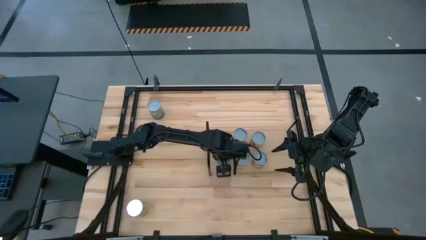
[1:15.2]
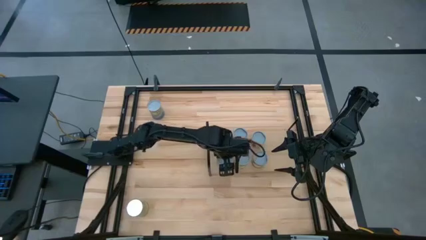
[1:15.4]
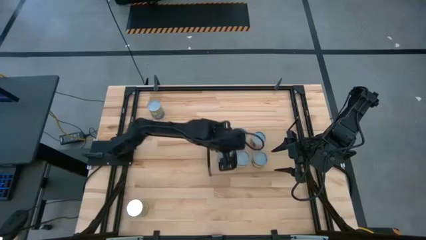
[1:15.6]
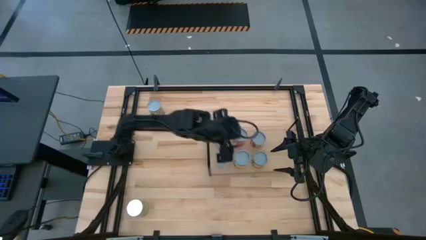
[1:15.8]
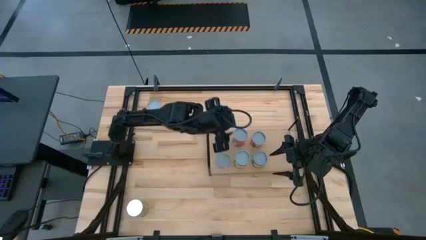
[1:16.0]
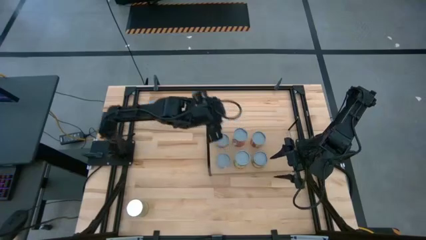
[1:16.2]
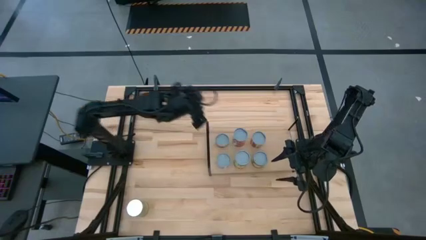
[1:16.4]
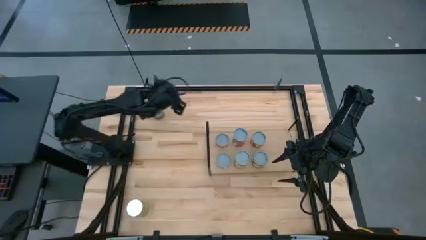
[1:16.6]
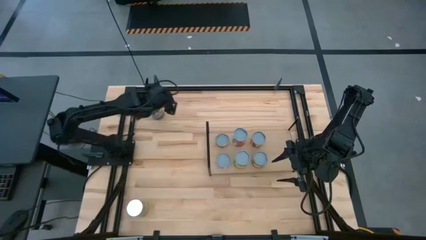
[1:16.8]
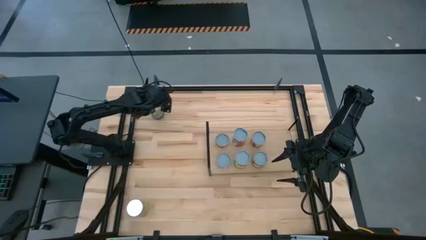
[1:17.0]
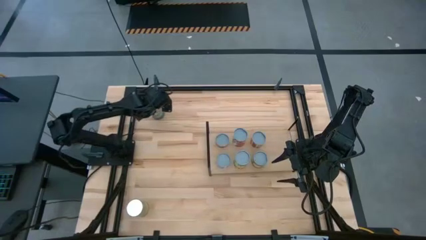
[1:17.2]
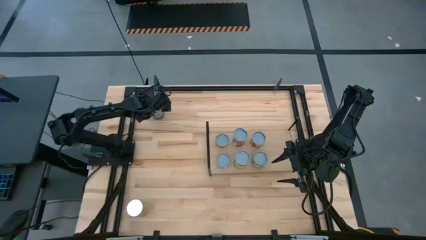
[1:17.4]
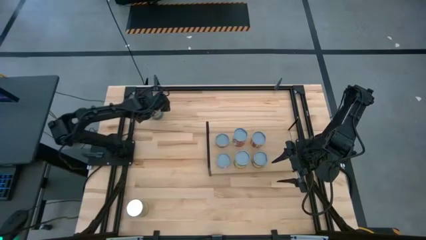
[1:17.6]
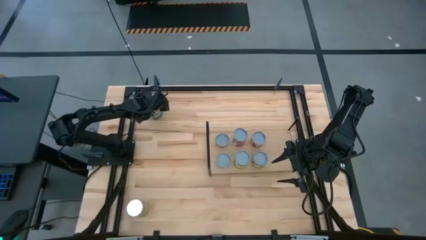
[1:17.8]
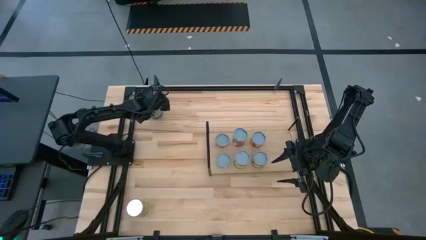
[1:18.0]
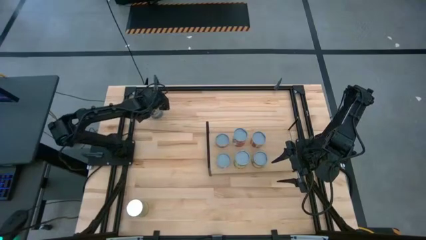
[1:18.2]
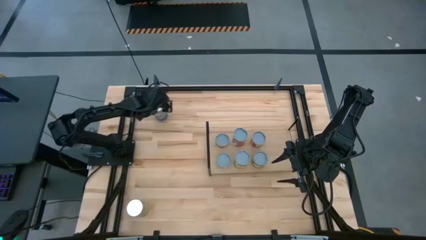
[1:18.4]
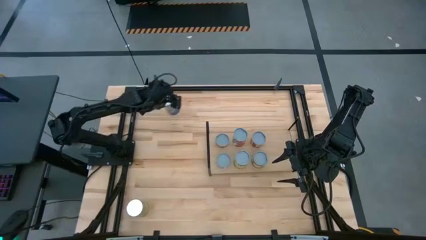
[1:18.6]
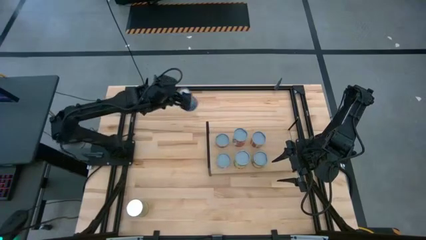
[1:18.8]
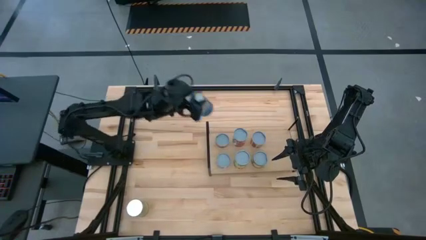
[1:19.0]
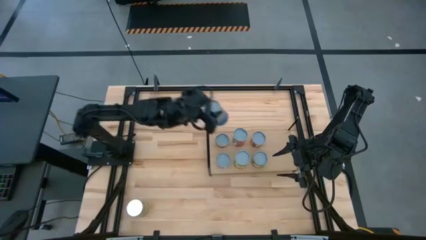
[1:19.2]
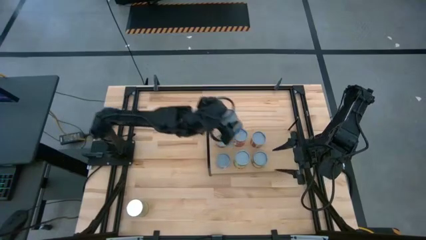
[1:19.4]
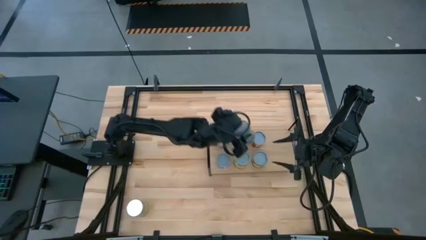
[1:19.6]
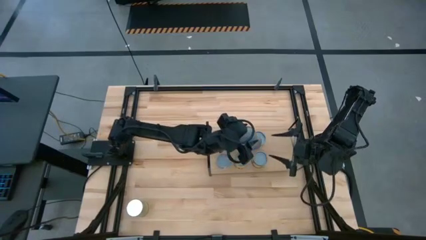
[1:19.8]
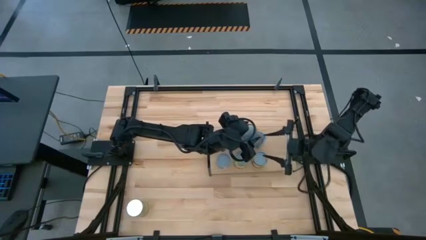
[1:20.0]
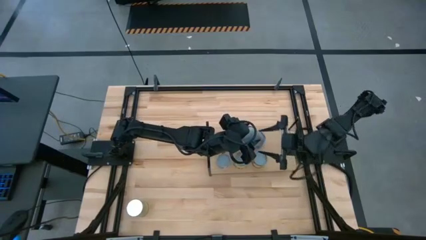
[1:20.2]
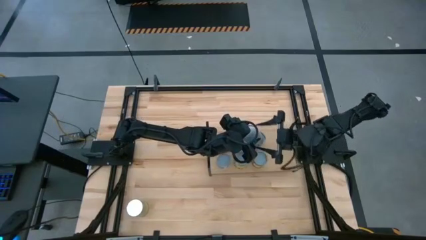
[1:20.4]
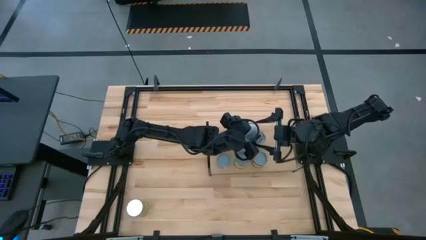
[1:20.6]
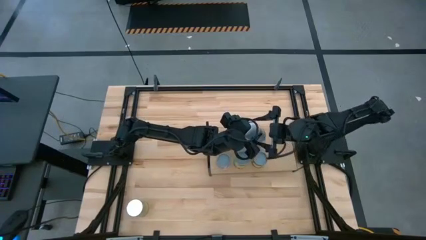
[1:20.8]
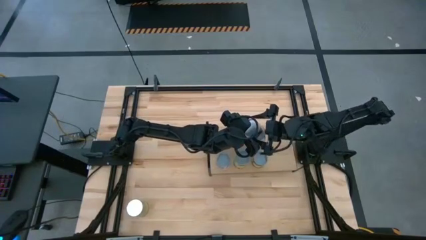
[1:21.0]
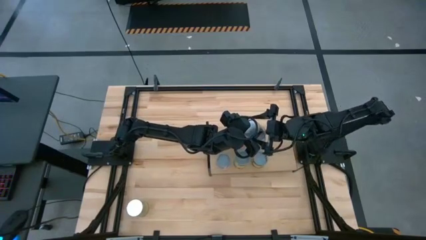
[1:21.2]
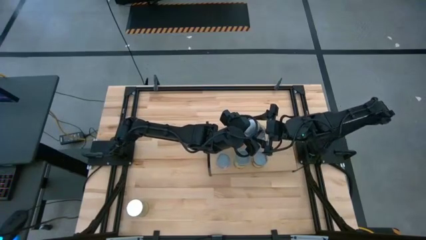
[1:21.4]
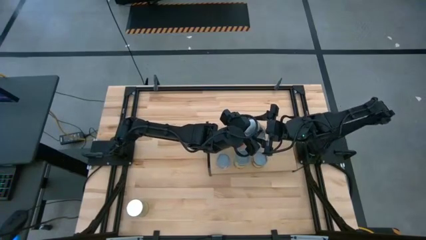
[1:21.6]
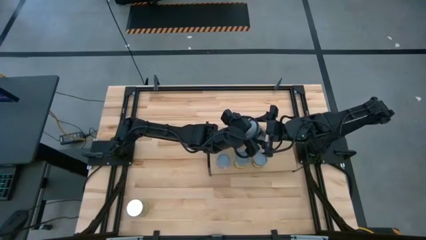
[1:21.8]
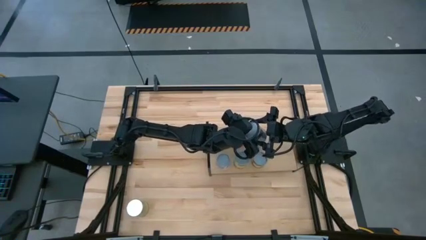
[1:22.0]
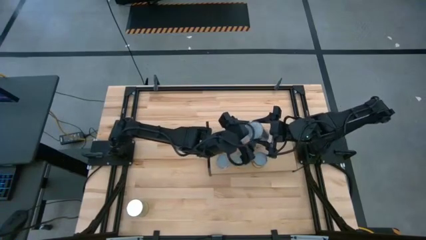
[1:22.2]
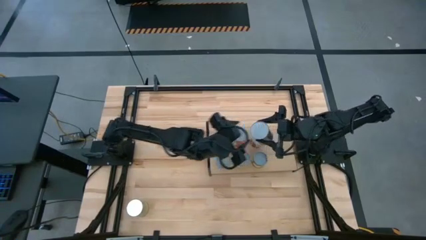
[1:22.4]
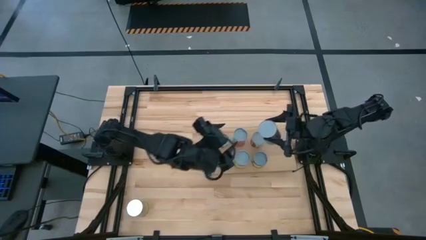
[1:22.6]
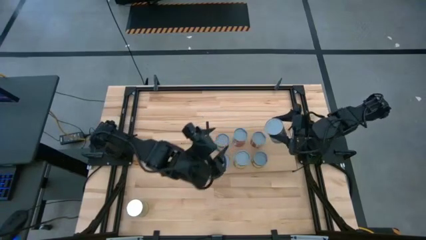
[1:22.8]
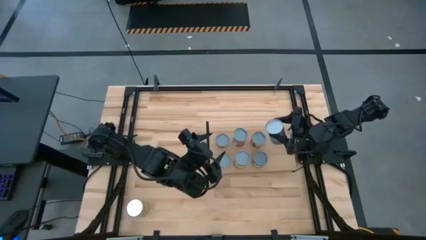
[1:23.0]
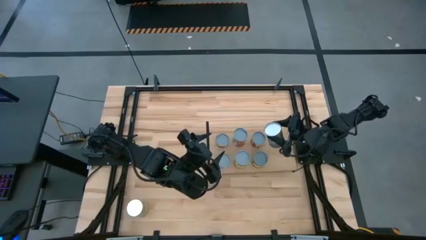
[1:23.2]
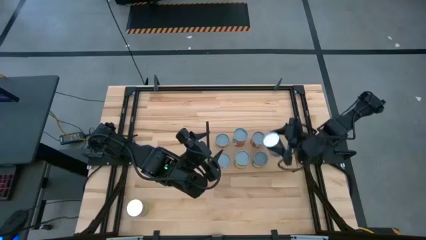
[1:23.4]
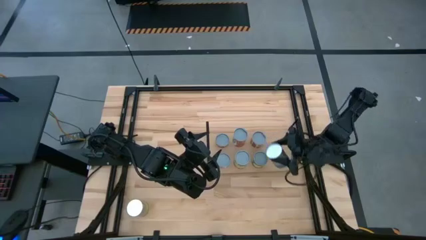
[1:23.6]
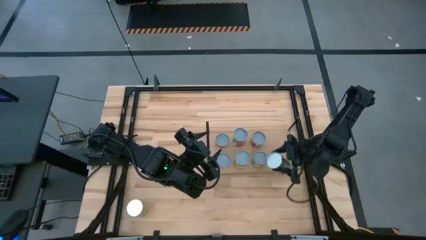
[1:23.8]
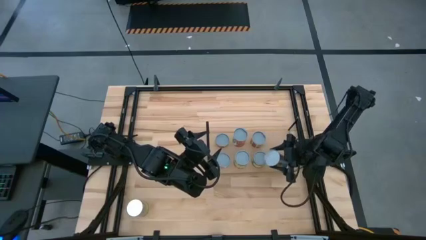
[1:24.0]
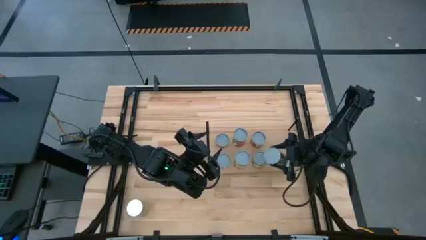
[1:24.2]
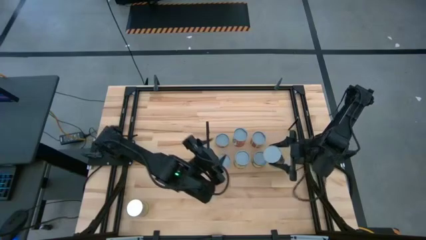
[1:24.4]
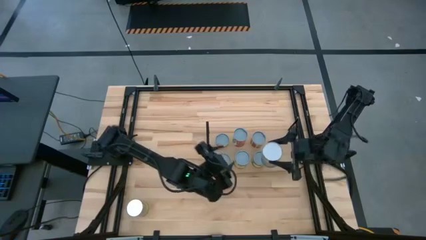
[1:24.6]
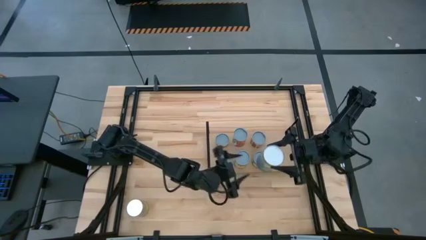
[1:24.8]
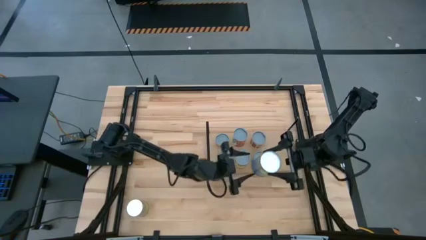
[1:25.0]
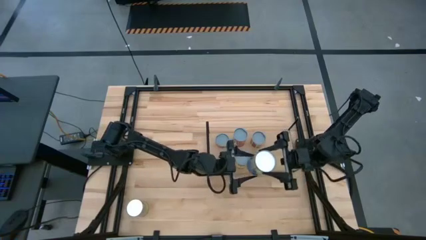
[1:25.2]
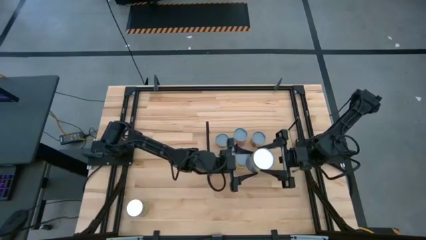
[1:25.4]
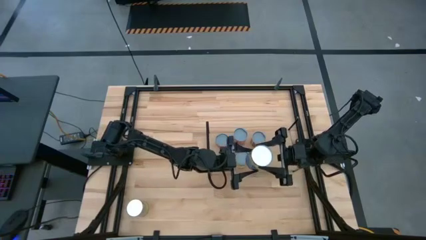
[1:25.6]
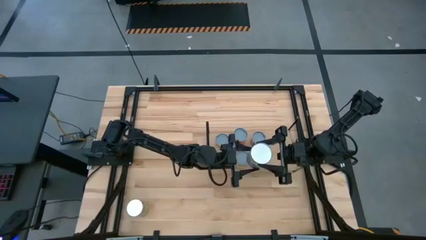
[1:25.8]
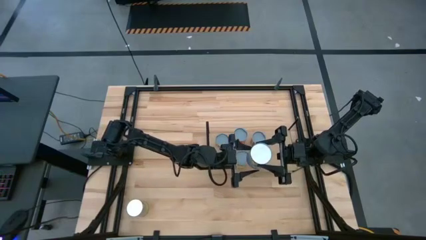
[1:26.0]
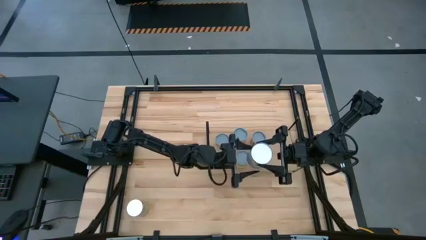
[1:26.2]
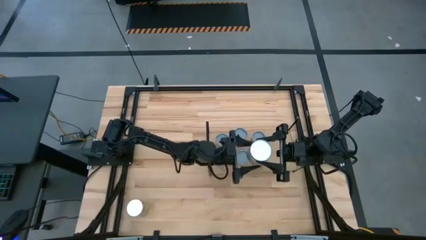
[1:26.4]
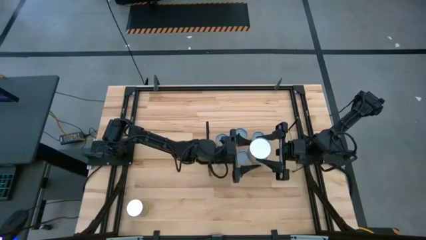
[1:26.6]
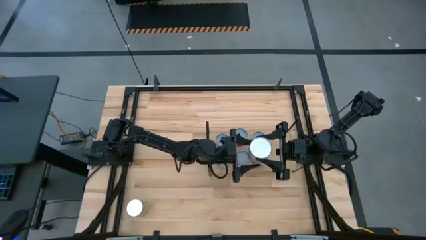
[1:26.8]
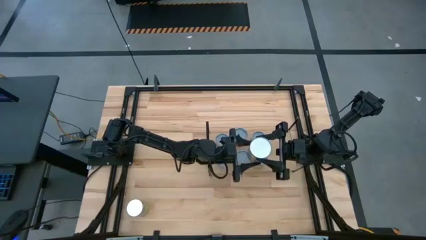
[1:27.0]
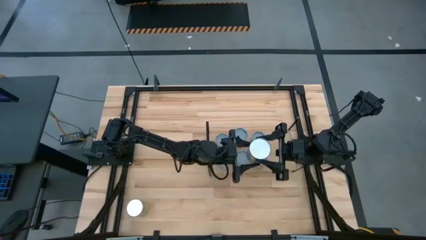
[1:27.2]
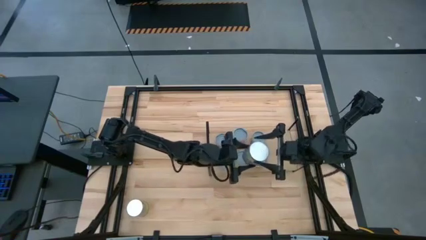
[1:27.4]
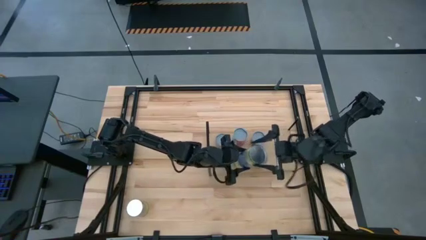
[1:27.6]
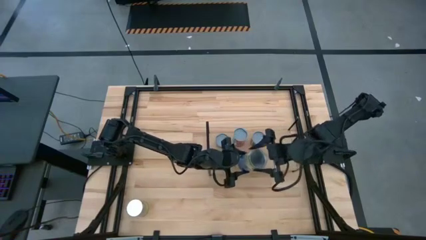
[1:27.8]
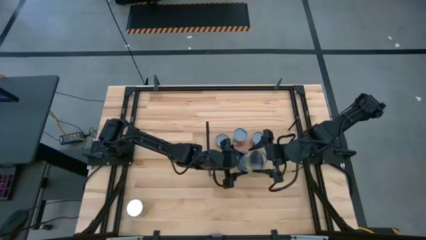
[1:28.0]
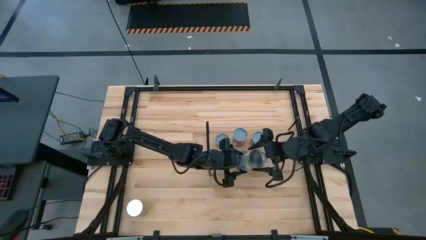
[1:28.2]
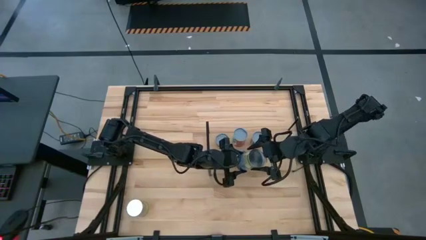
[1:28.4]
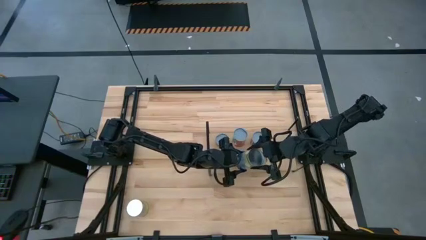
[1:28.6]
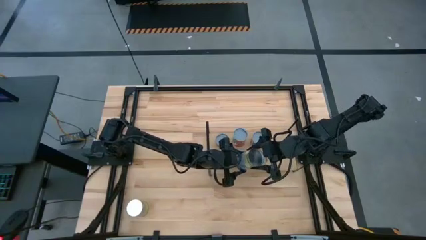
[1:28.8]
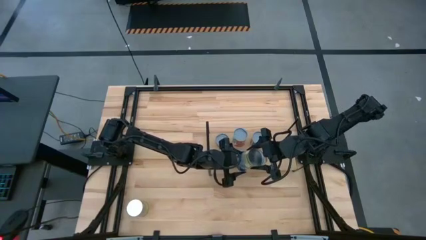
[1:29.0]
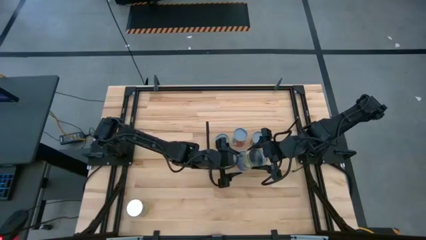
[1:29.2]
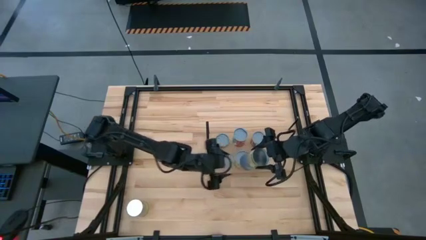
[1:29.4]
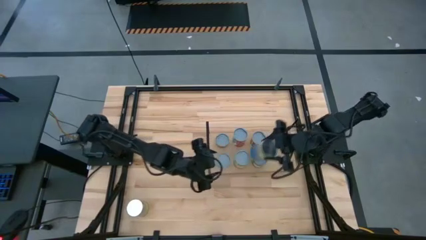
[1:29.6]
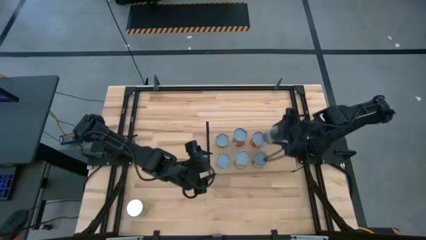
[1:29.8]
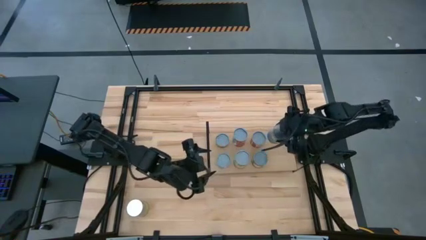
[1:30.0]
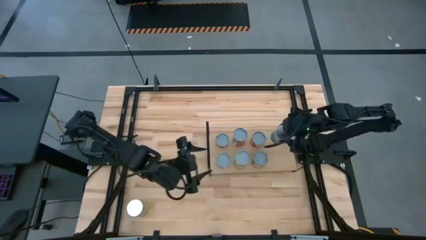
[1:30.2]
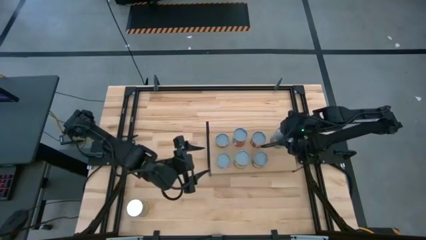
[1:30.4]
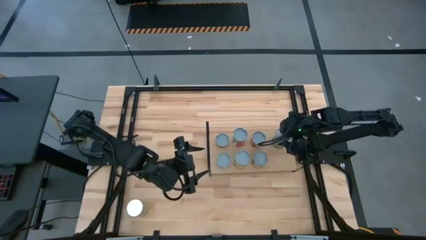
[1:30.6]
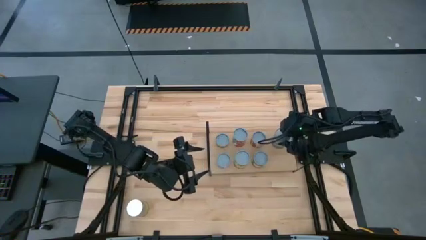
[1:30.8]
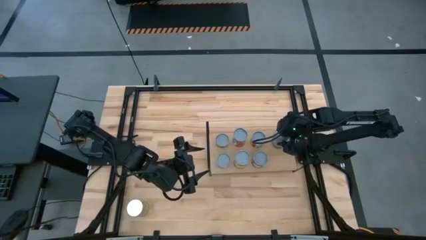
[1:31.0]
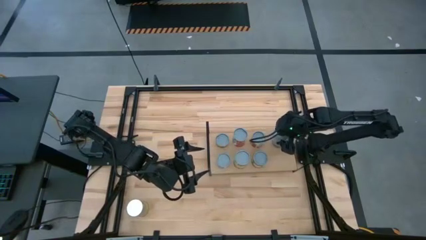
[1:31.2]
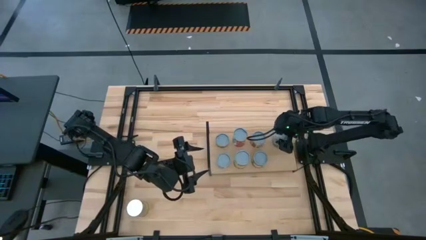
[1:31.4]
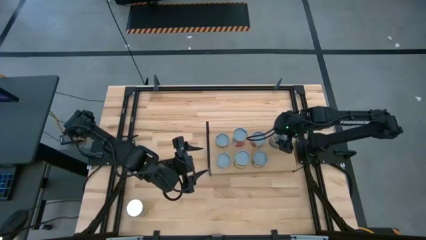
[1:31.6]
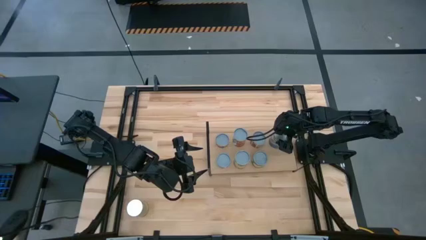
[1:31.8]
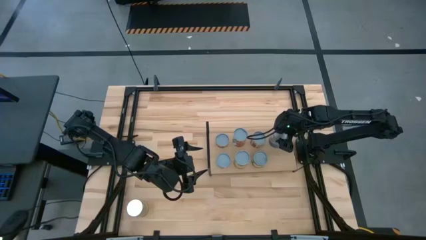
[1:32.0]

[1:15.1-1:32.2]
Task: Pick and place cans onto a shelf
Put the blue on the shelf aligned with the red can
